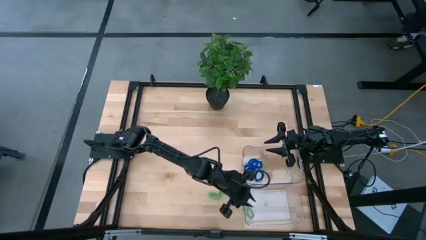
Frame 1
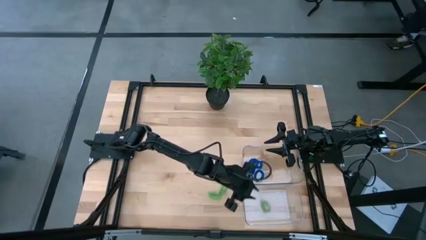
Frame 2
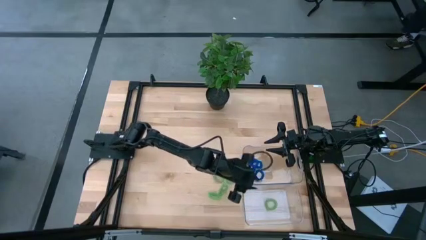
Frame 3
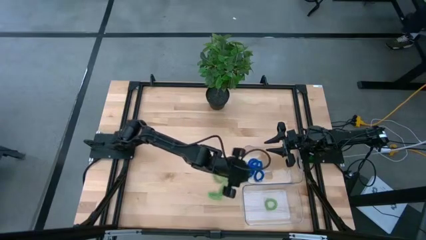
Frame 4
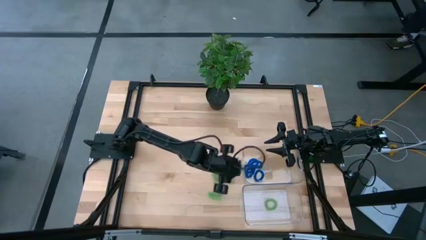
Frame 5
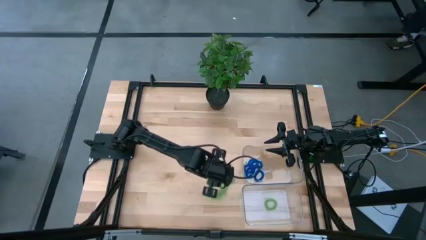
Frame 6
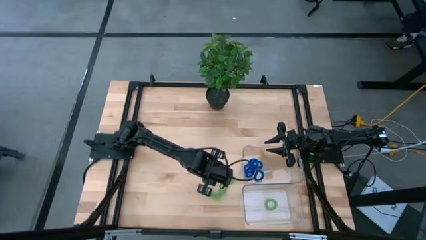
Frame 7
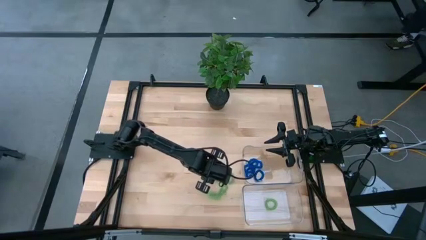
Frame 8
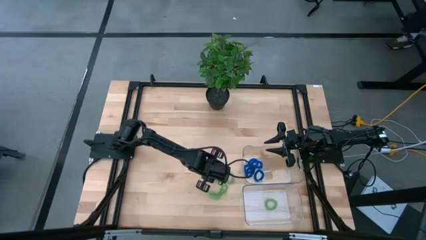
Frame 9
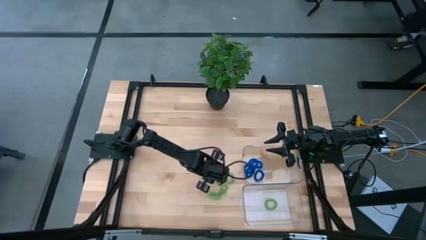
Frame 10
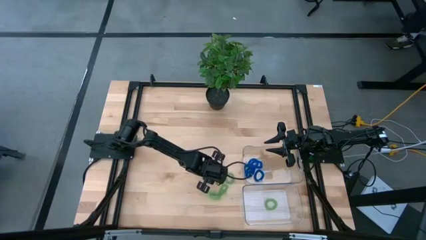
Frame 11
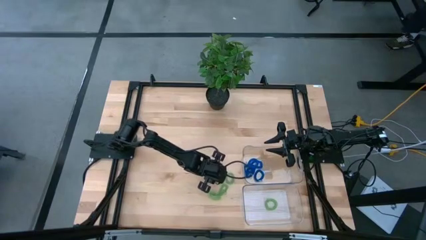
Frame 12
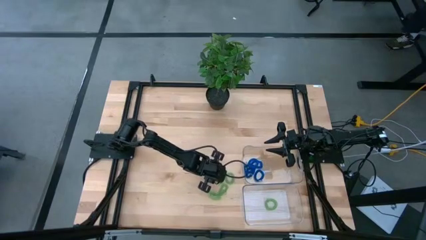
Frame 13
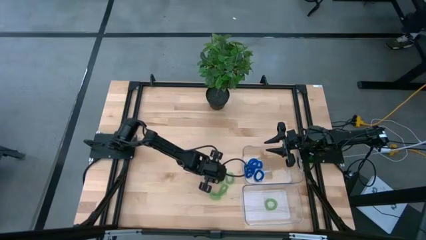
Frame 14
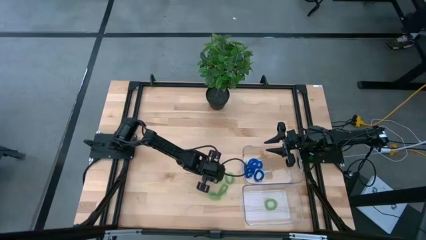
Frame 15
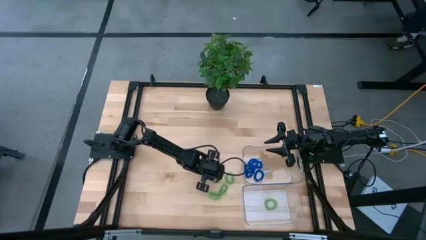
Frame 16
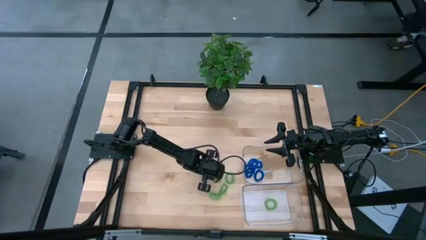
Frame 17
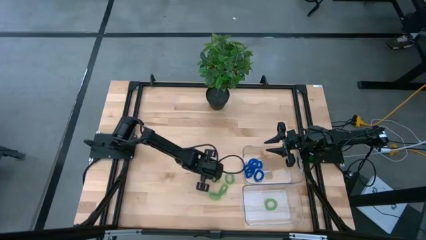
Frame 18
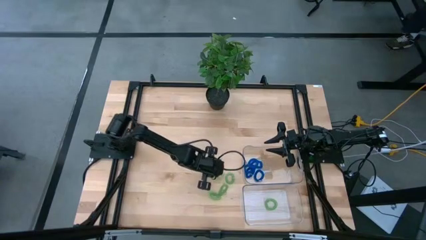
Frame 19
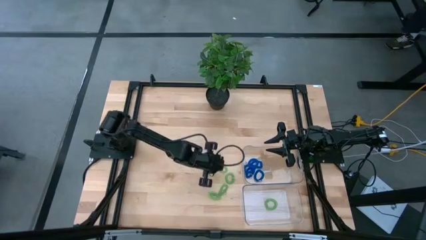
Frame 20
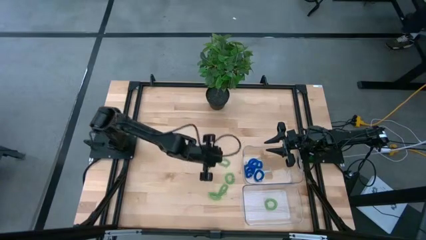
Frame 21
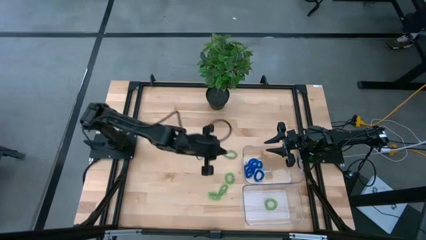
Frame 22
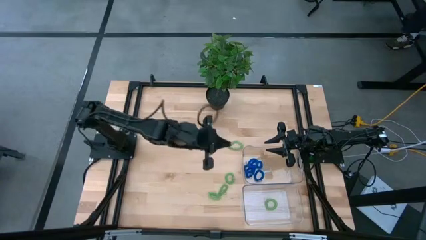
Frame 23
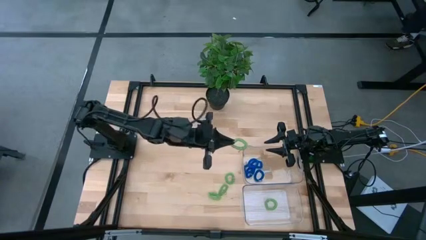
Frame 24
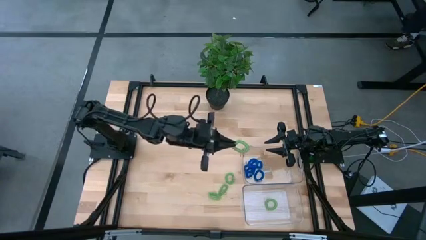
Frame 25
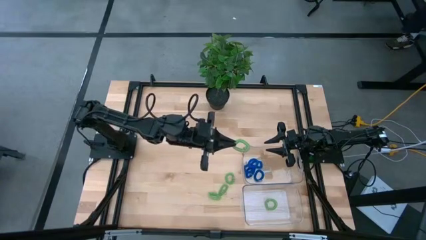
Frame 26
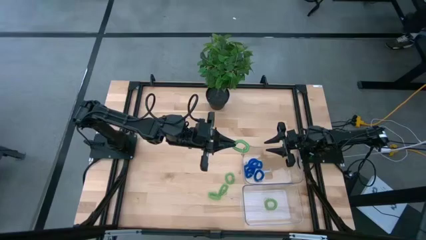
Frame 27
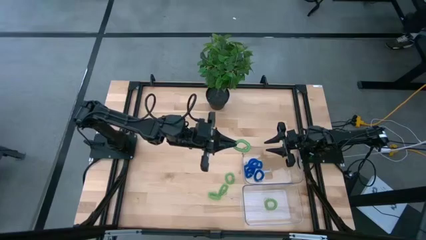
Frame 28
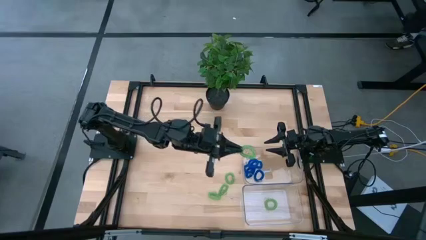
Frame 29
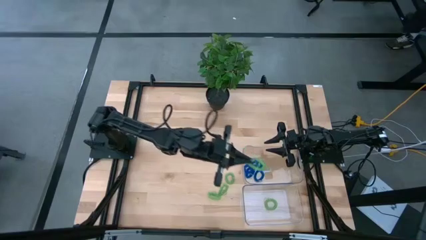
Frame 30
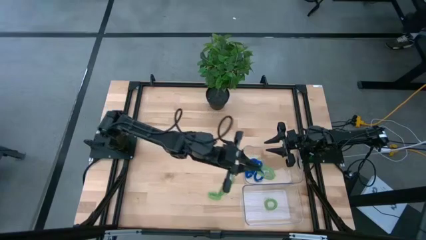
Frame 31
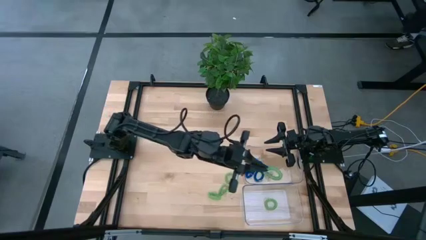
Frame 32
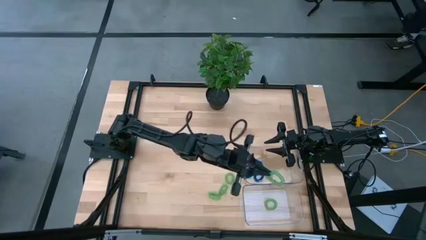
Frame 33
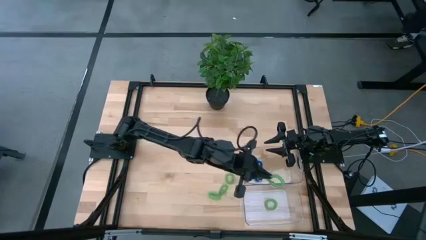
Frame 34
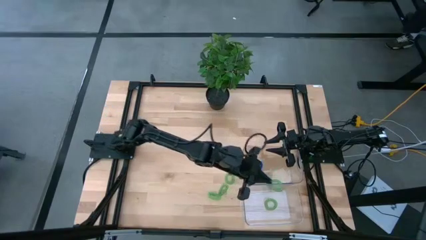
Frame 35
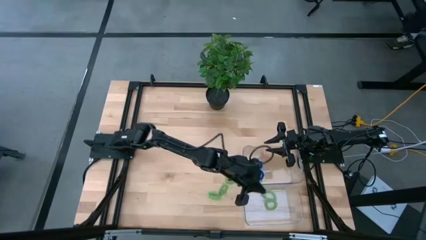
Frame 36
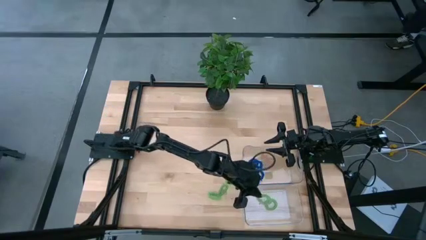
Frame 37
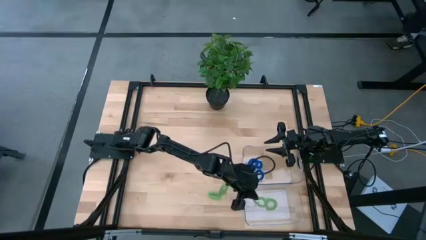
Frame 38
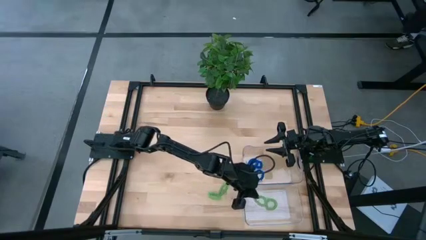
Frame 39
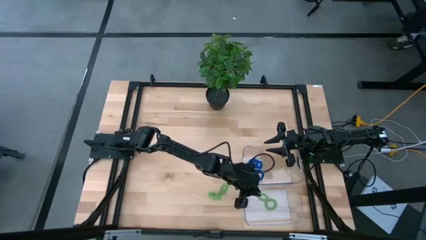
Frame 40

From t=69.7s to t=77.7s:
Task: Sort spring keychains
Put the green spring keychain in the bottom transparent bin
